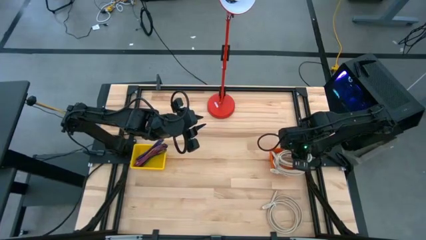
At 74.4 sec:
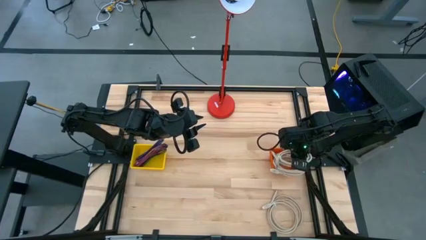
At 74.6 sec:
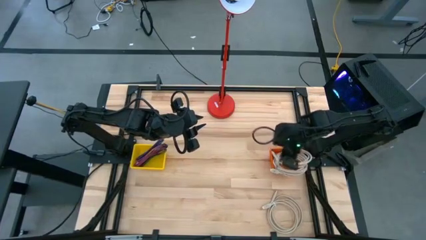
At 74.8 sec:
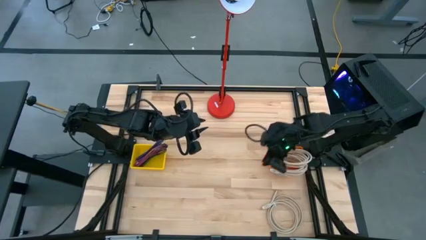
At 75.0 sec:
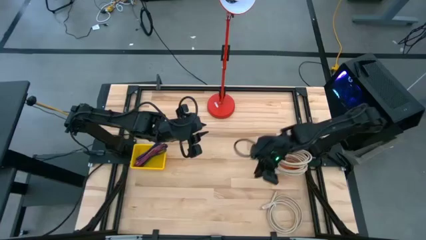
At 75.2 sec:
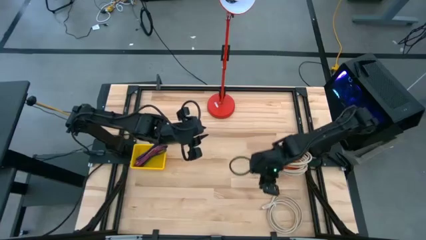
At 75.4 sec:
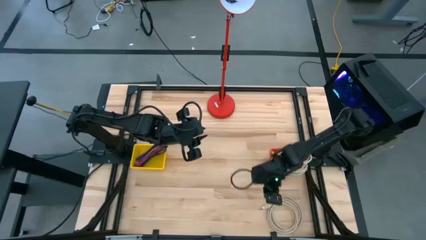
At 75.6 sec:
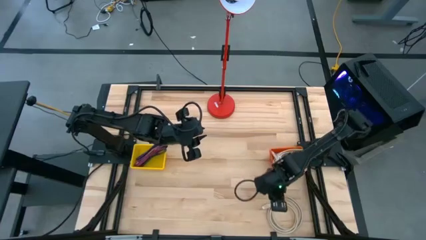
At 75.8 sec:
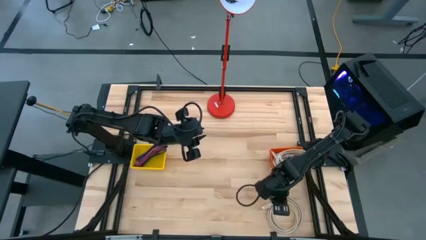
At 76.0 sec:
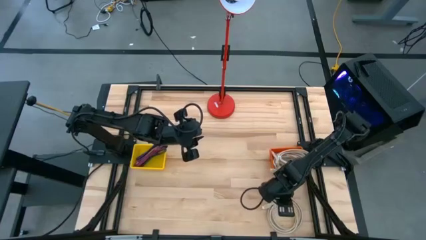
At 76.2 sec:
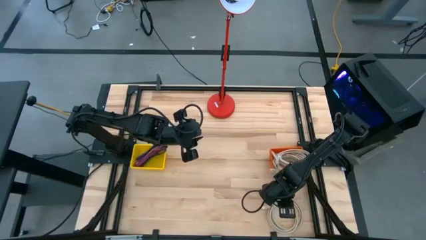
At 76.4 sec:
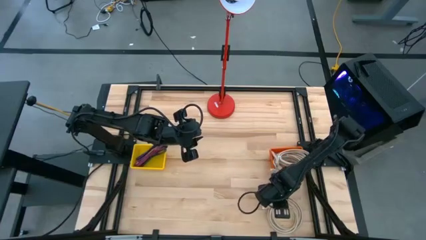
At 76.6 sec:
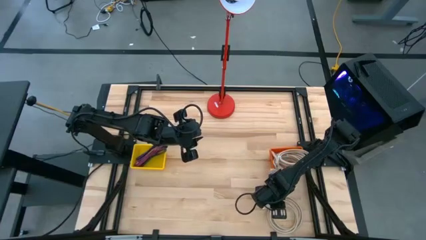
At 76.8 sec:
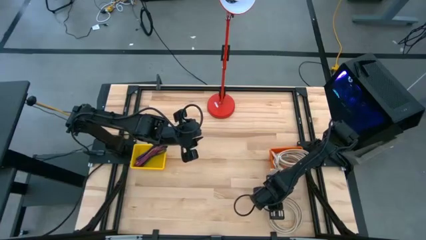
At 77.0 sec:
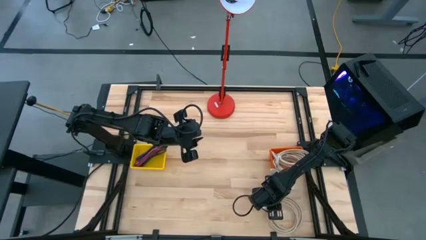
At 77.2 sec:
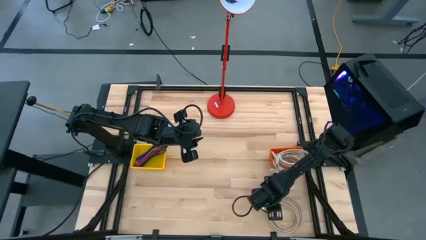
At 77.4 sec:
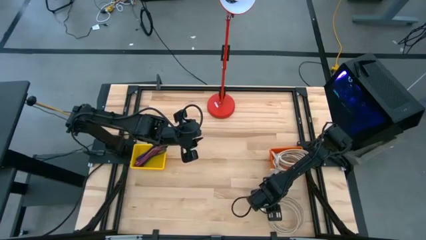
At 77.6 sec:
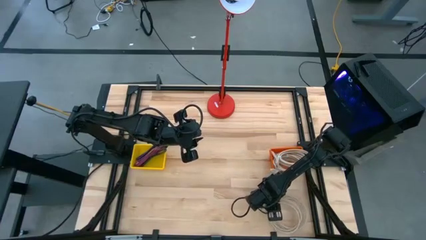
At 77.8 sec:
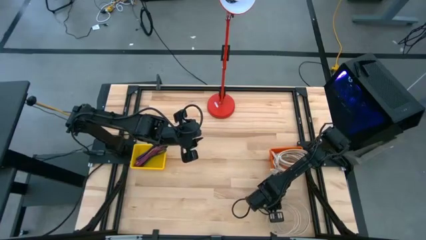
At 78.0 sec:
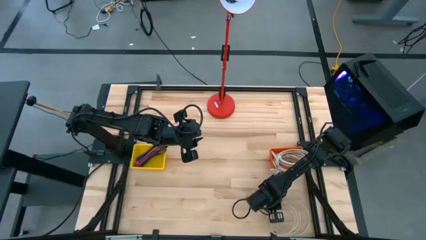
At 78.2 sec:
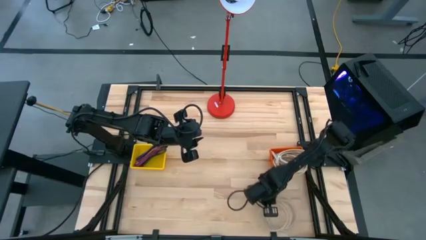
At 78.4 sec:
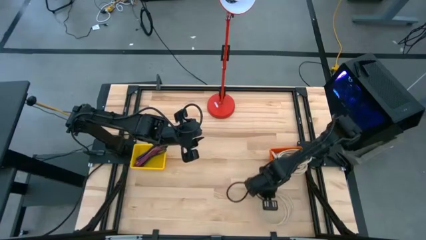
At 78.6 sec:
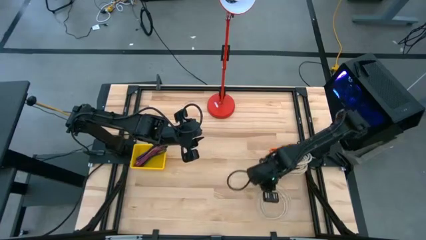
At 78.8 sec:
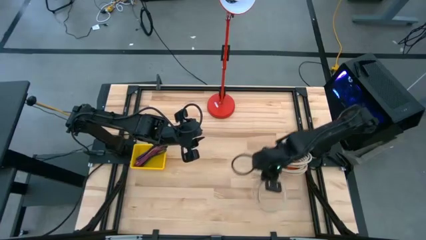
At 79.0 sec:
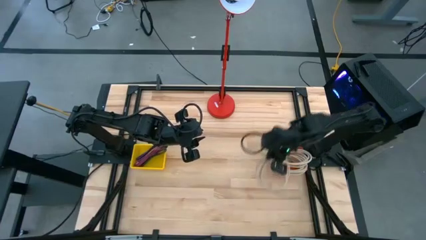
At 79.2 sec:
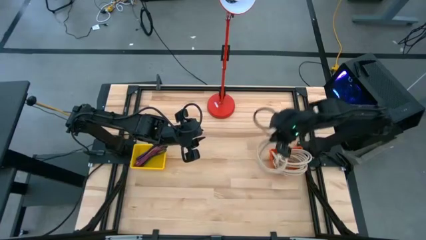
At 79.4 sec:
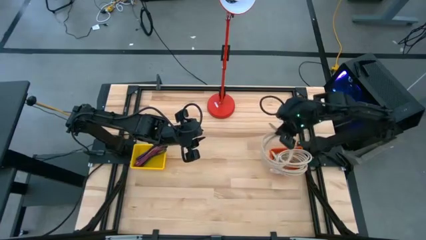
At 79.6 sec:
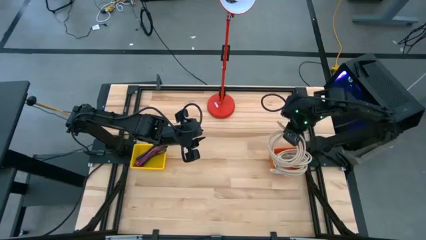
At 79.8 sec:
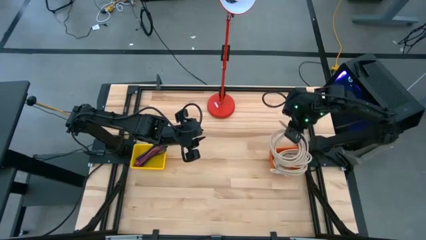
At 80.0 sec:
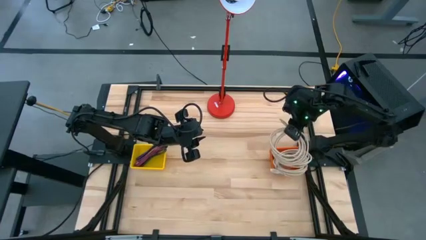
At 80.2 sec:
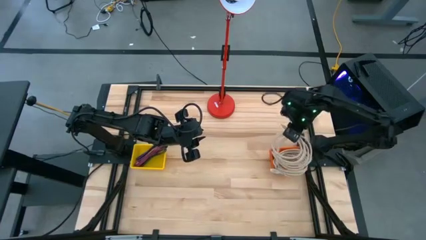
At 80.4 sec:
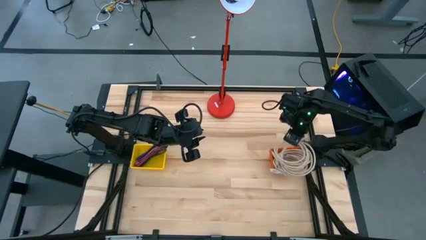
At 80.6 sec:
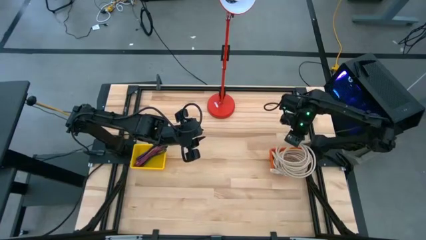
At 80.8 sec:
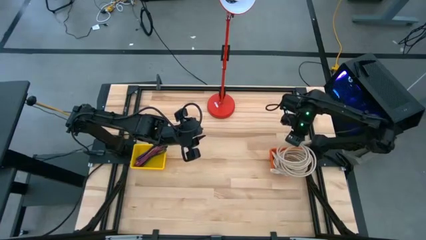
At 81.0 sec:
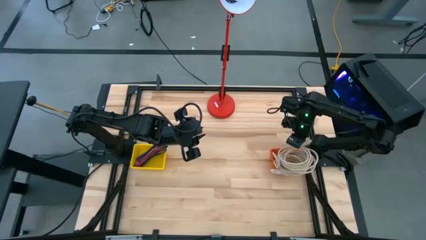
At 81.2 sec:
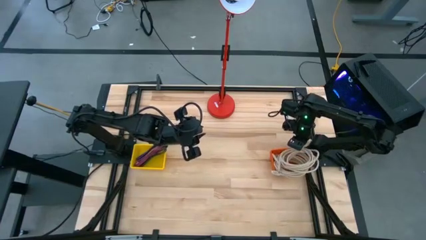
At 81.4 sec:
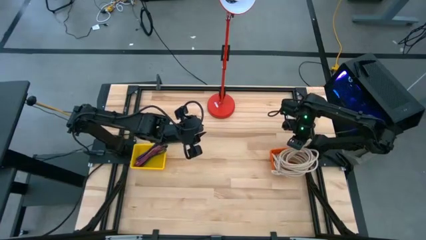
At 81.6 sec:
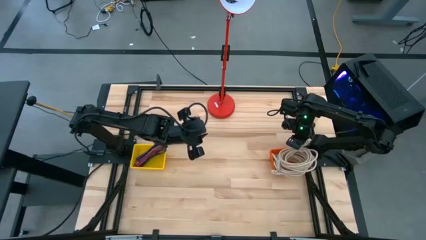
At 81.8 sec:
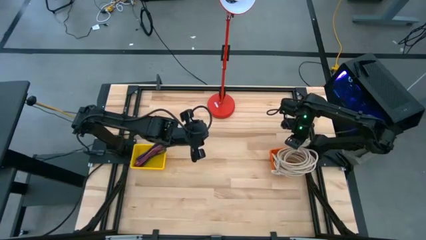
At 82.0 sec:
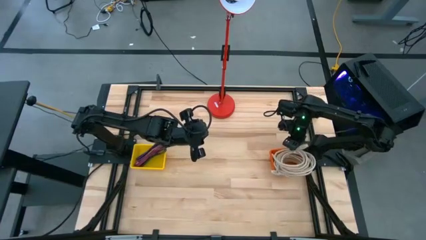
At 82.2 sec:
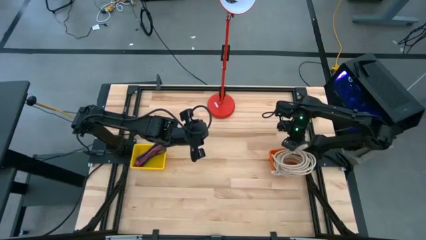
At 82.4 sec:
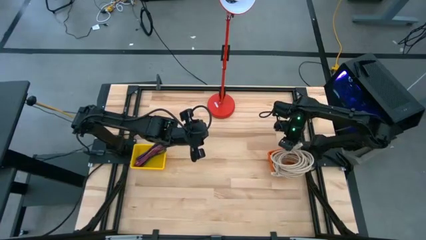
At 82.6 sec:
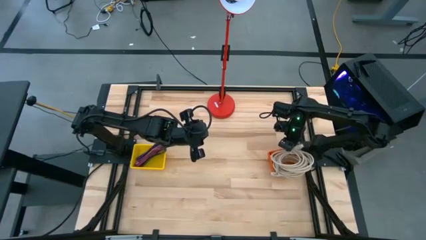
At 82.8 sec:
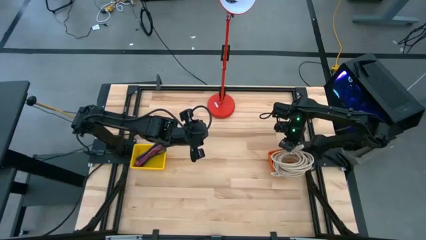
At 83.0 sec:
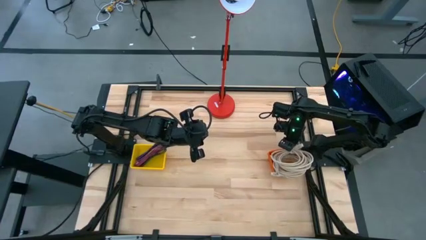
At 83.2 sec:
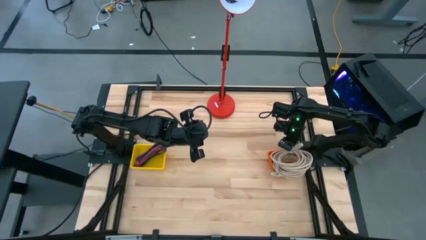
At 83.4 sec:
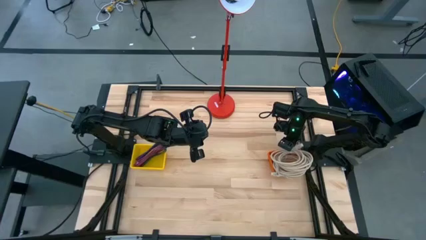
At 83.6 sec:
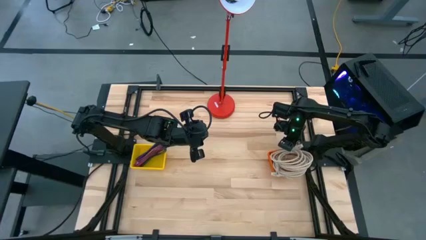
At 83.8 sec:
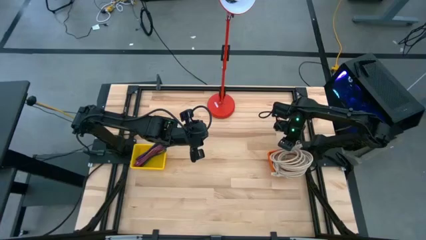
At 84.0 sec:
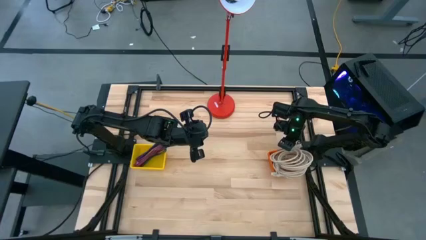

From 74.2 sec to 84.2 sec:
Task: Pick & Place USB Port
Put the brown HDMI cable into the orange bin
